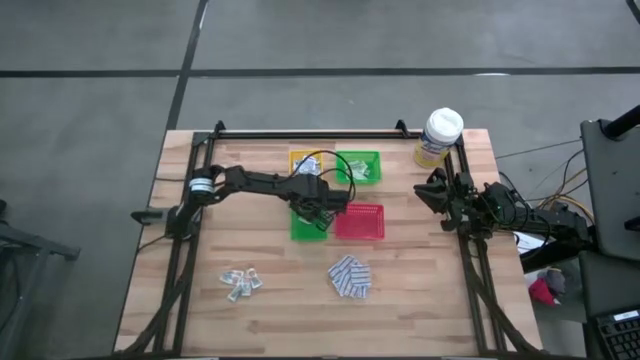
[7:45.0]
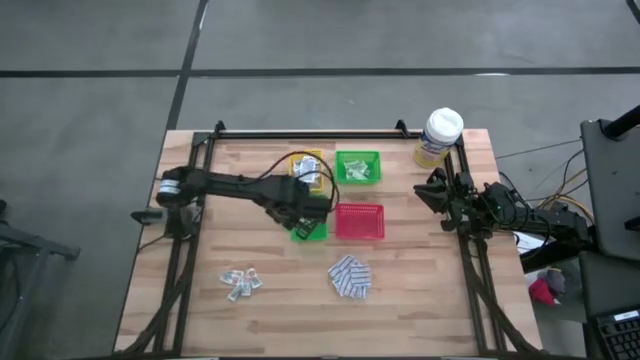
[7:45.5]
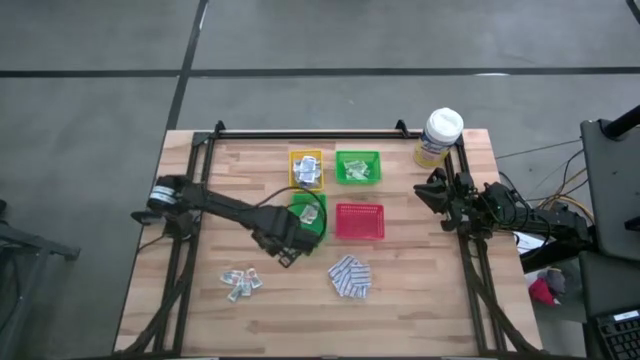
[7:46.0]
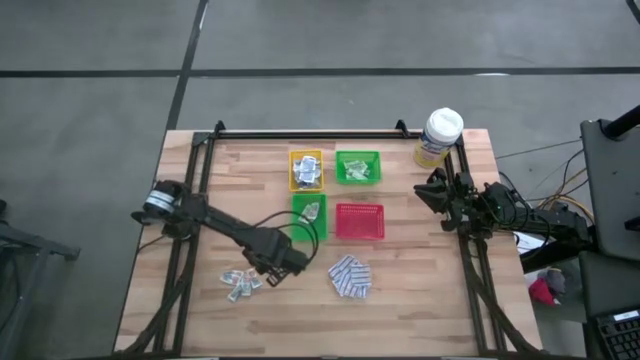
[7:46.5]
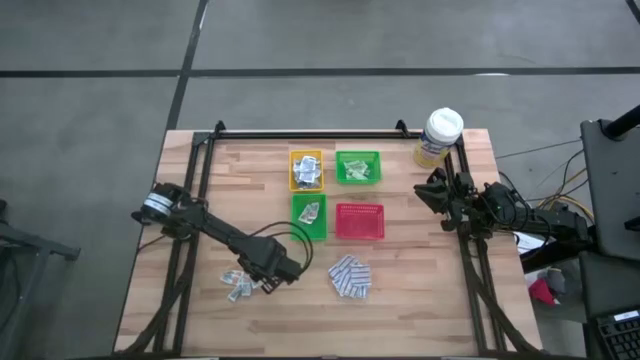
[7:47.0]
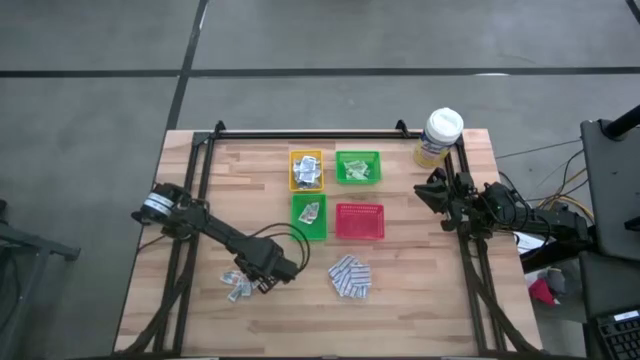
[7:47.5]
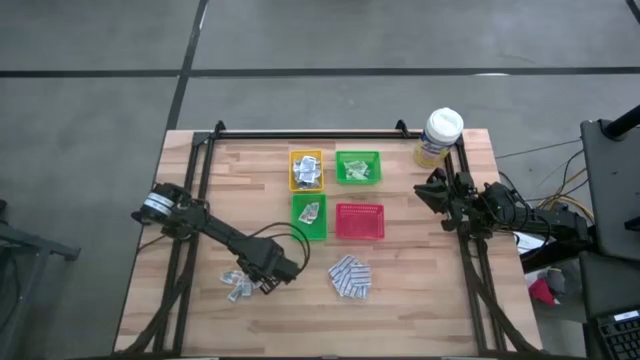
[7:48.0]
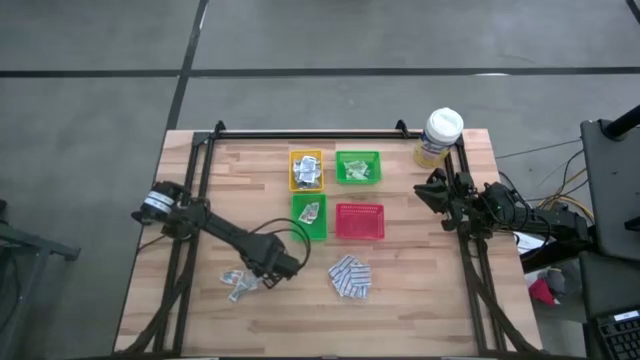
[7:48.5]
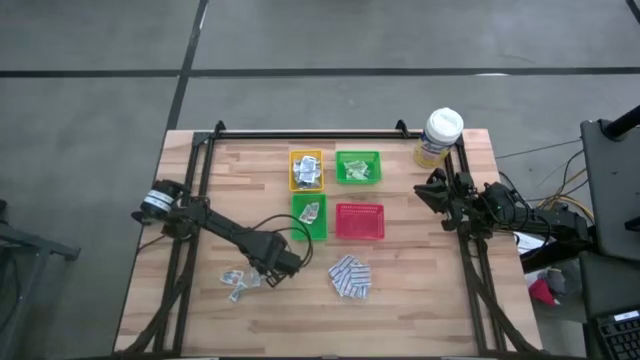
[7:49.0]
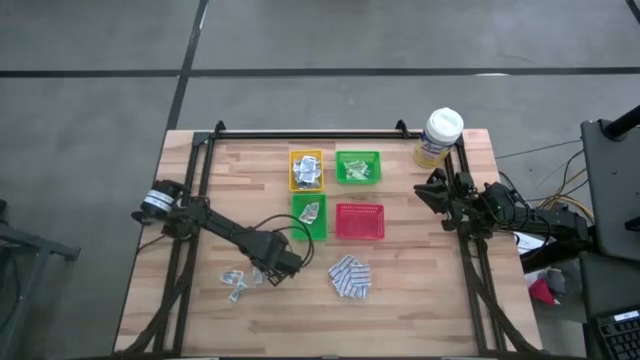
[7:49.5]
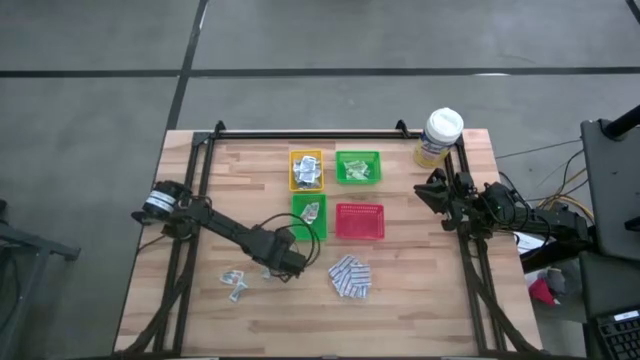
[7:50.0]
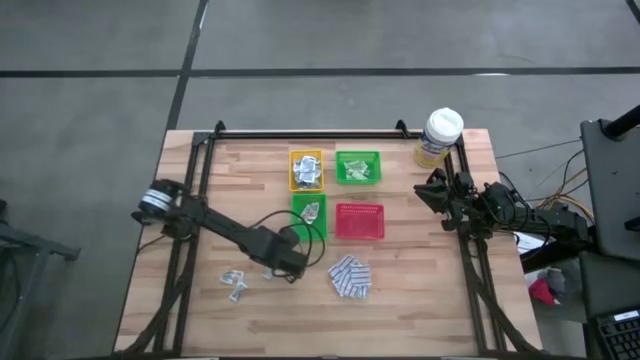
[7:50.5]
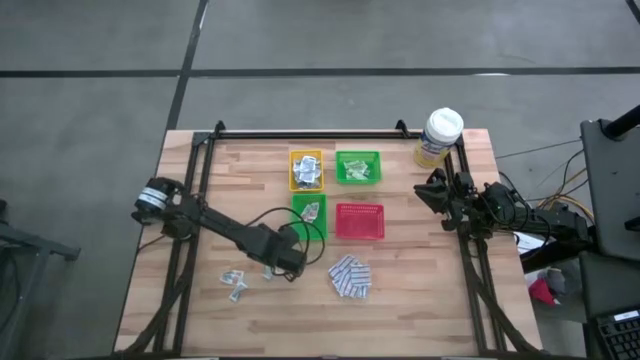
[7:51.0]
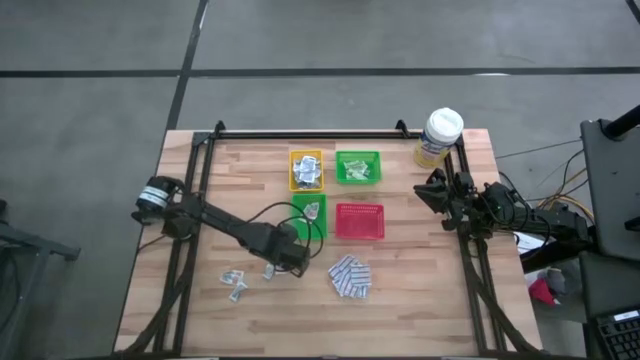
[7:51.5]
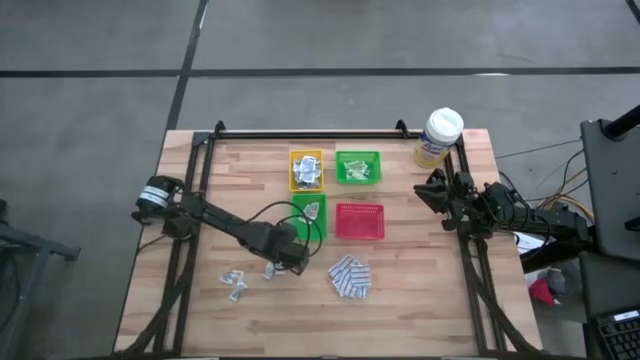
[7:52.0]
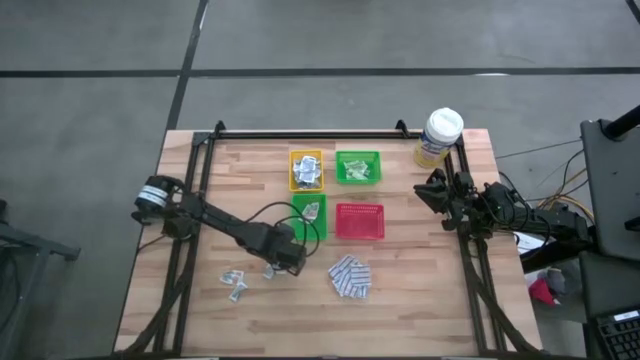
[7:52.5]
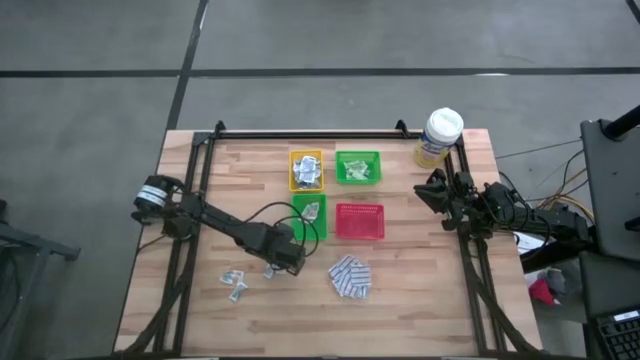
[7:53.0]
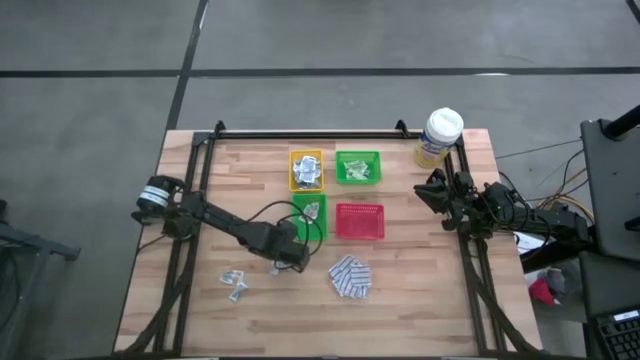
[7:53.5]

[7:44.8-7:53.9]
Task: Pick & Place First Aid Supplies
Put the orange ointment pack into the bottom green bin

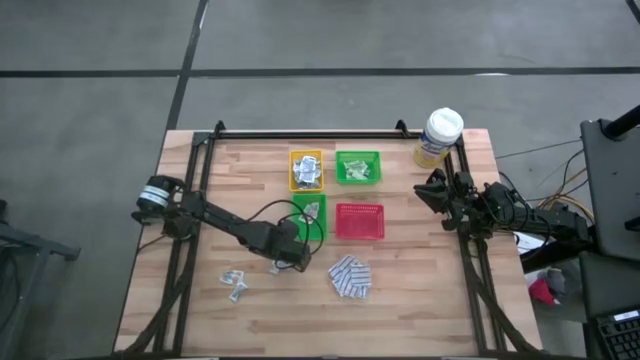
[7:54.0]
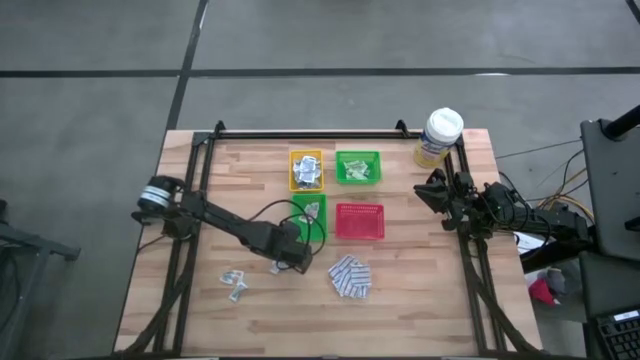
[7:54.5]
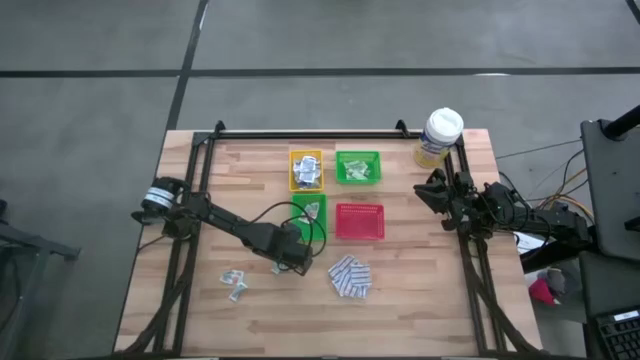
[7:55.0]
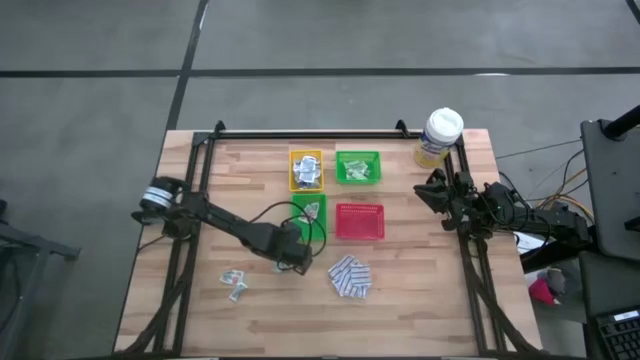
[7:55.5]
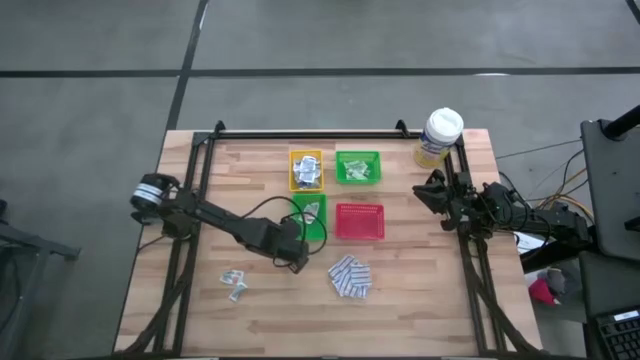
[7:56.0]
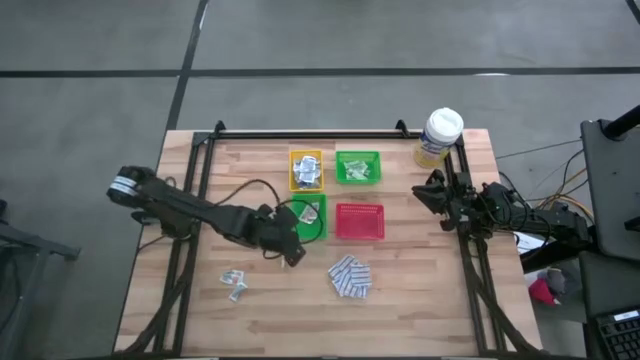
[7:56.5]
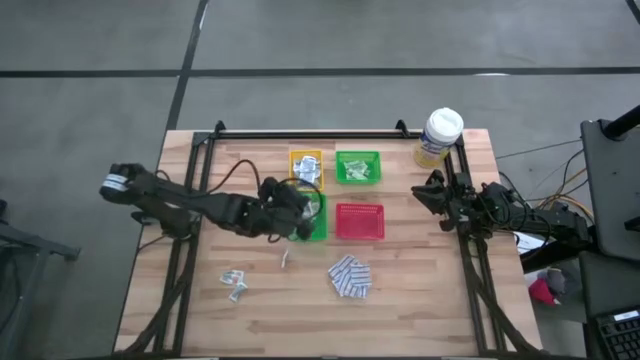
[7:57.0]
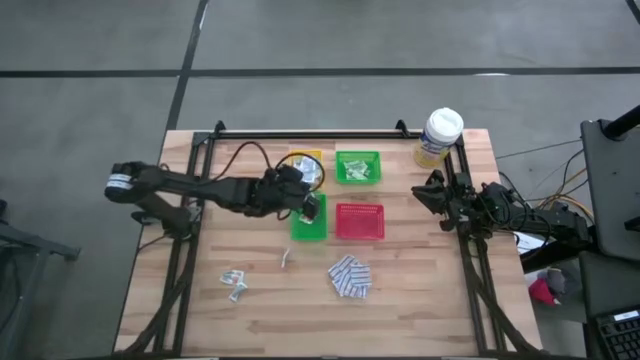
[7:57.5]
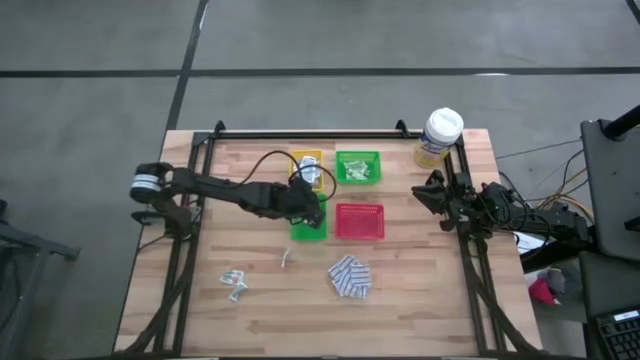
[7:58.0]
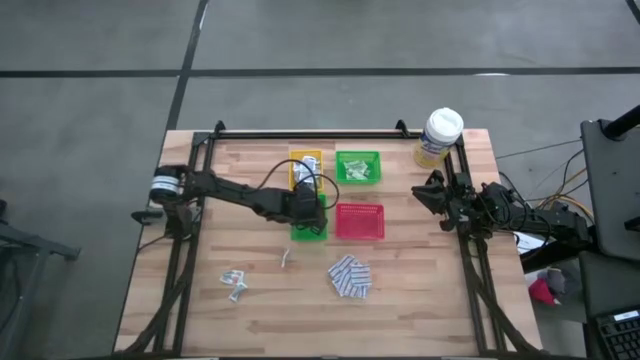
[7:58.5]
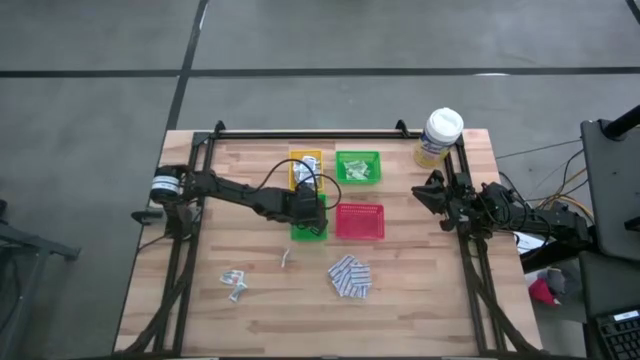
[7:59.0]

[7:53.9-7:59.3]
Put the orange ointment pack into the bottom green bin

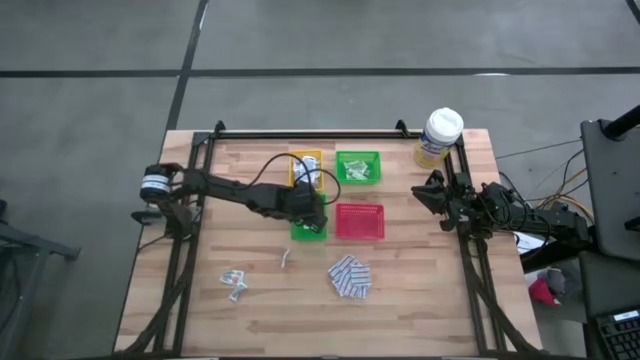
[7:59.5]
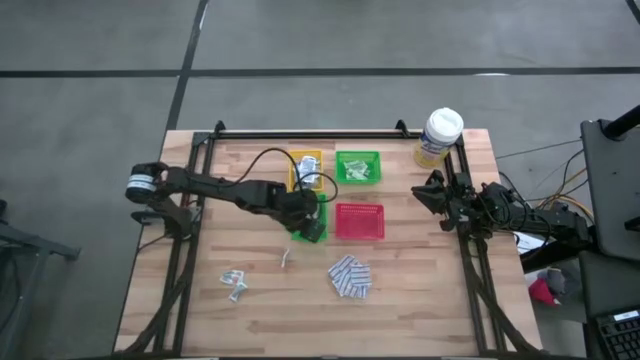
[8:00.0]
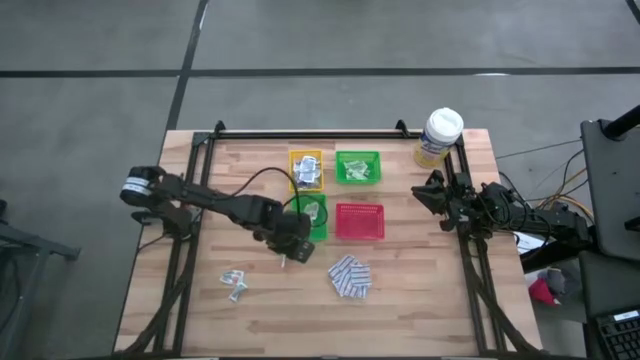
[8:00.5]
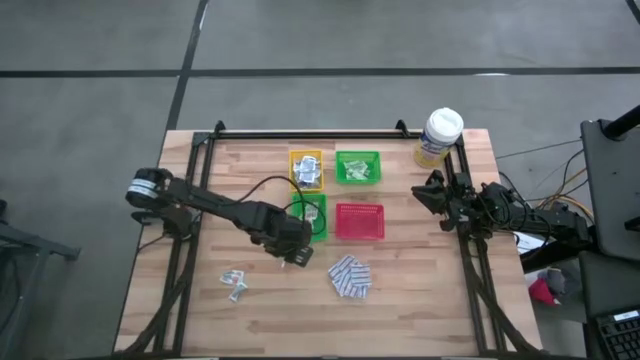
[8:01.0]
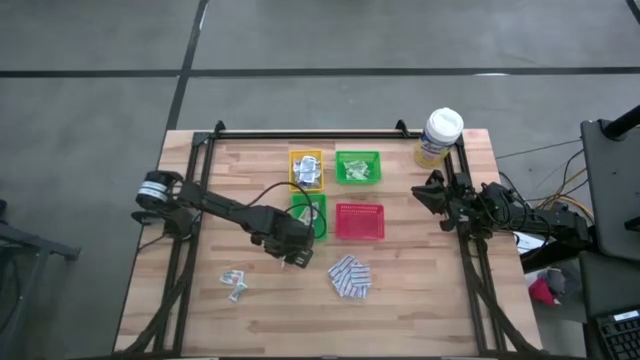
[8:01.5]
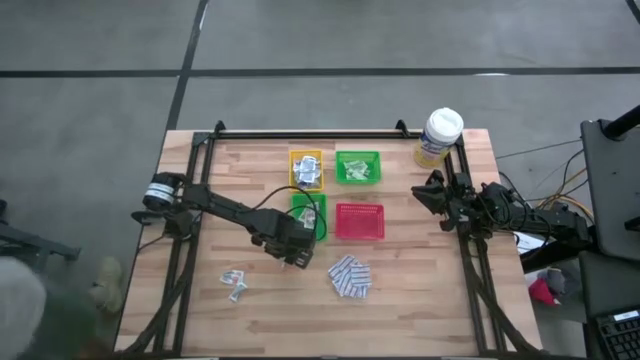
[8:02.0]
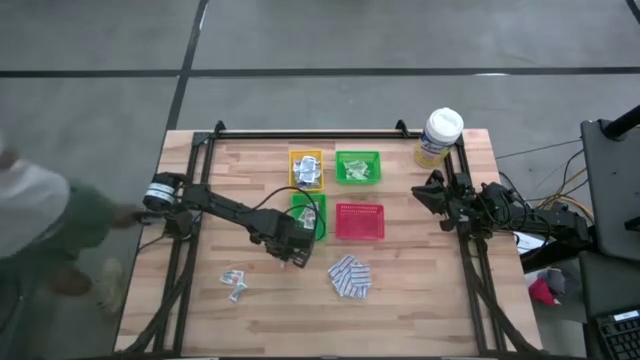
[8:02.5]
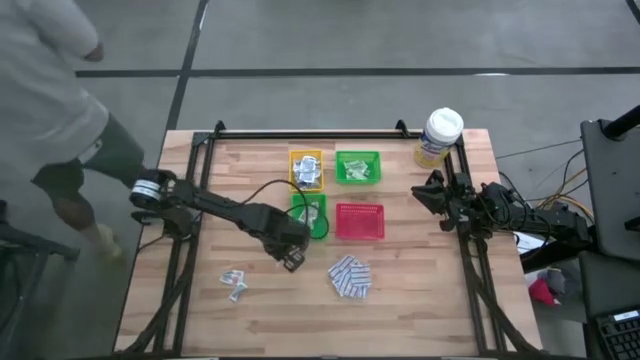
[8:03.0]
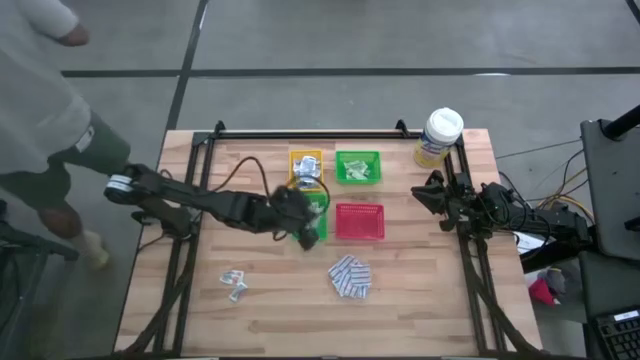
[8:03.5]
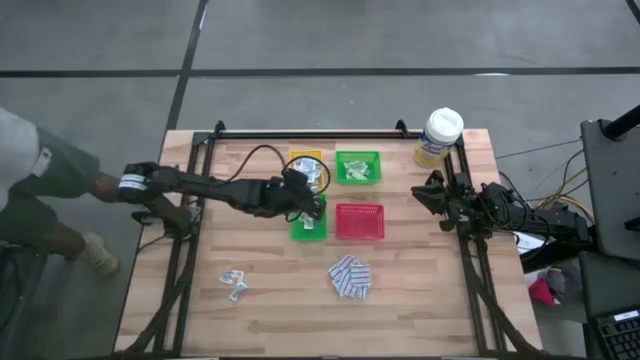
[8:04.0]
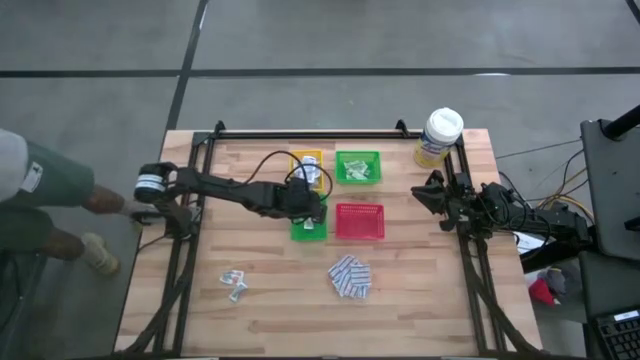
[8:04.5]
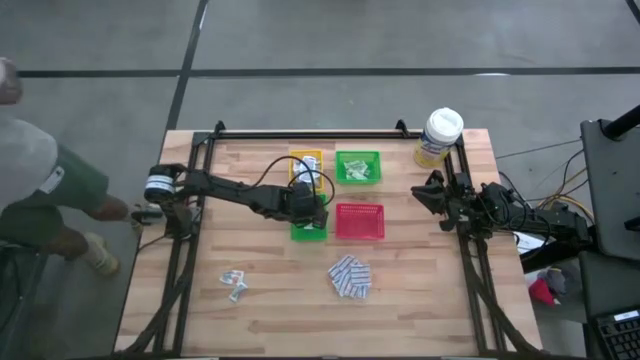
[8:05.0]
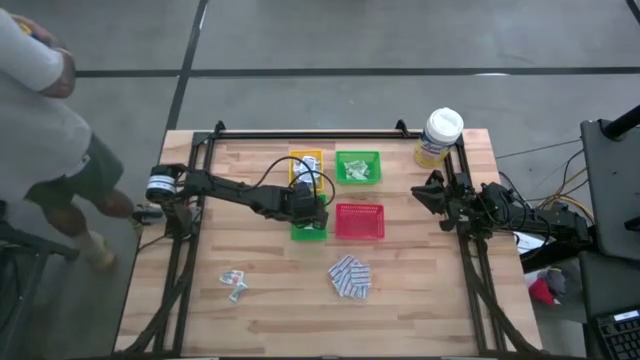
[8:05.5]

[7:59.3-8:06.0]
Put the orange ointment pack into the bottom green bin
